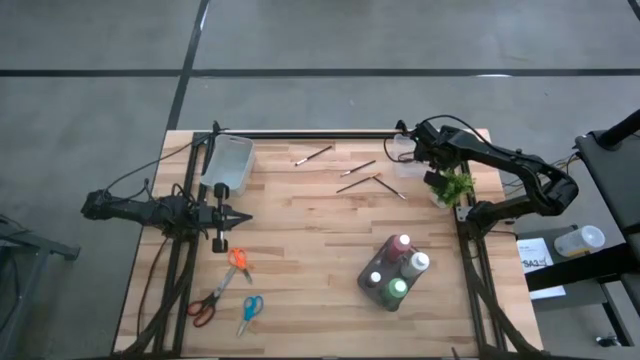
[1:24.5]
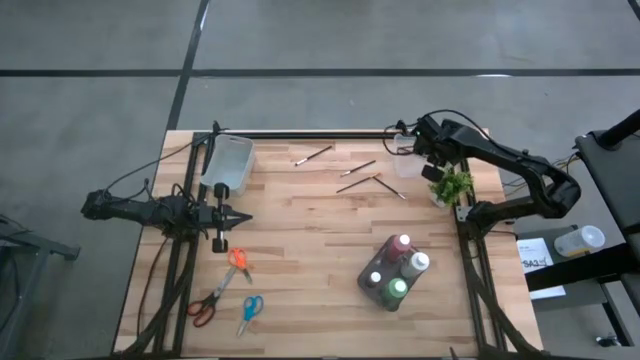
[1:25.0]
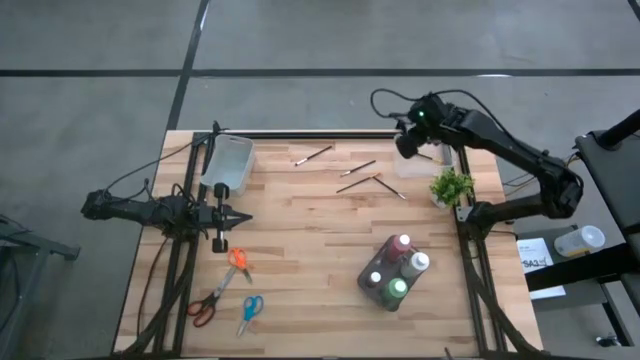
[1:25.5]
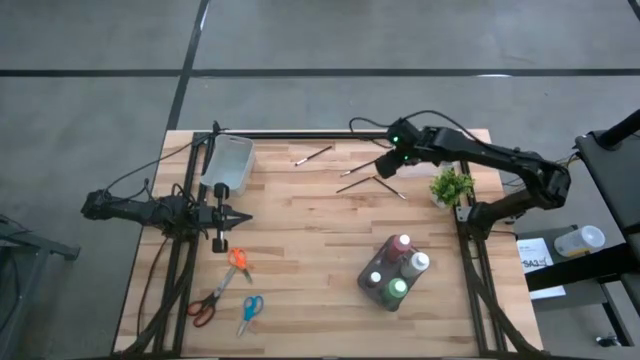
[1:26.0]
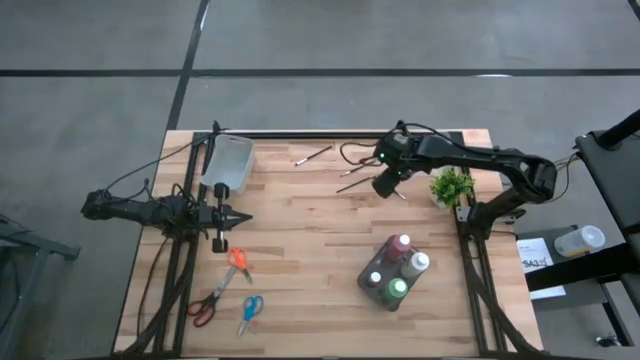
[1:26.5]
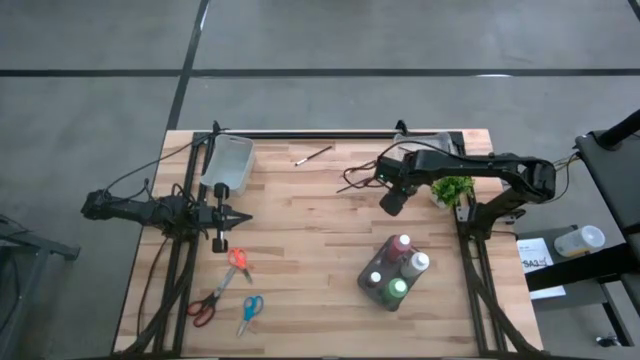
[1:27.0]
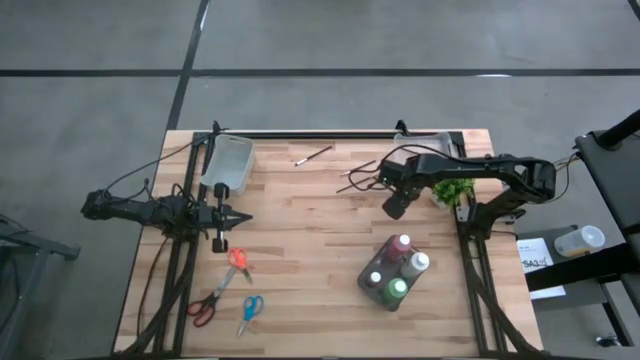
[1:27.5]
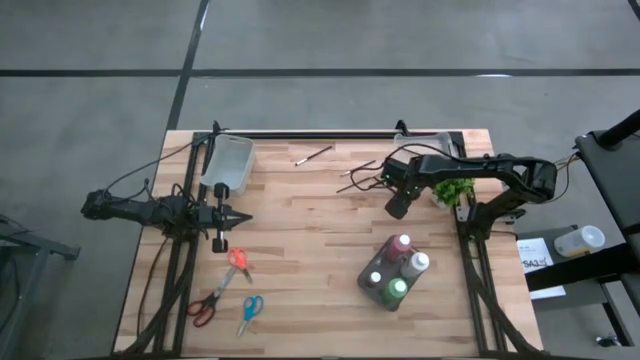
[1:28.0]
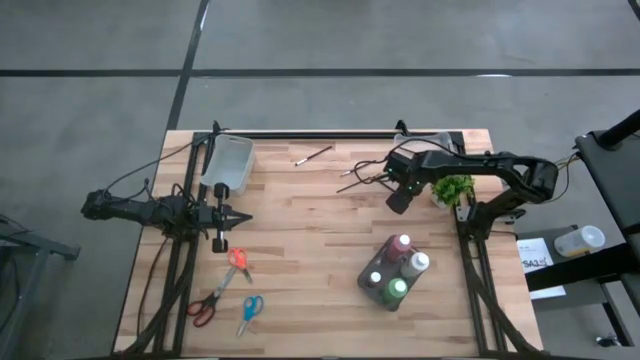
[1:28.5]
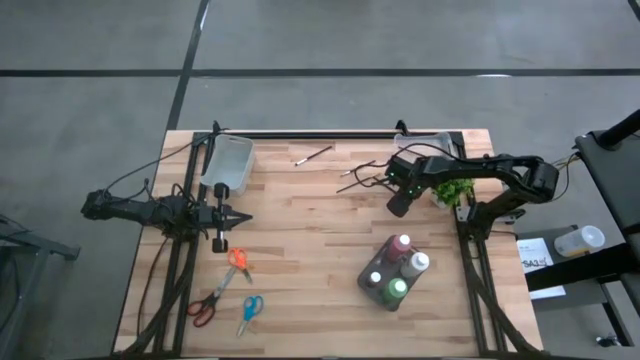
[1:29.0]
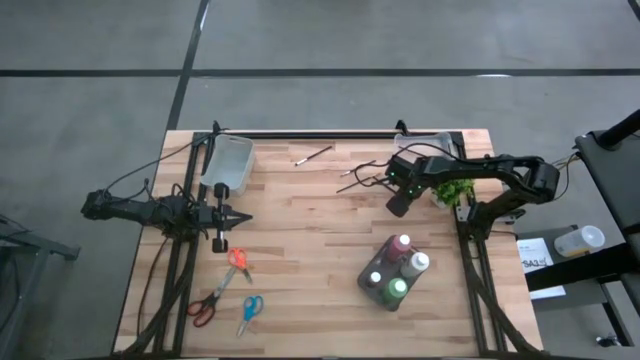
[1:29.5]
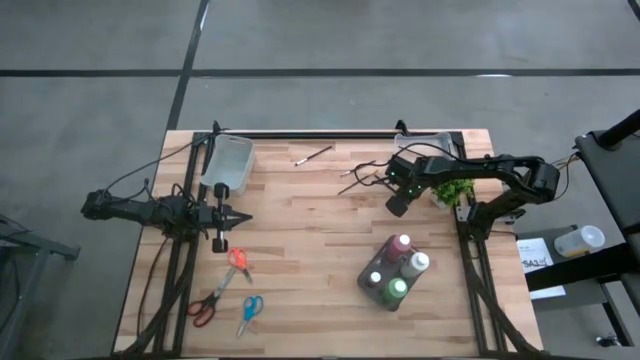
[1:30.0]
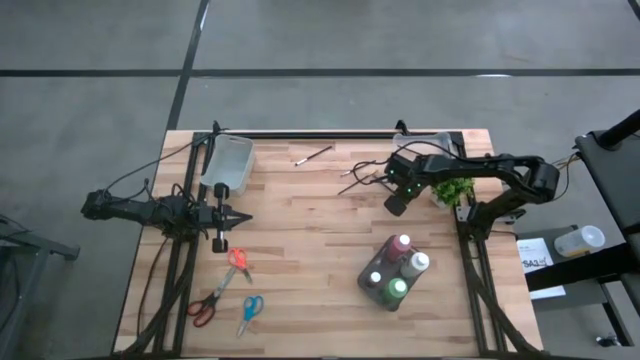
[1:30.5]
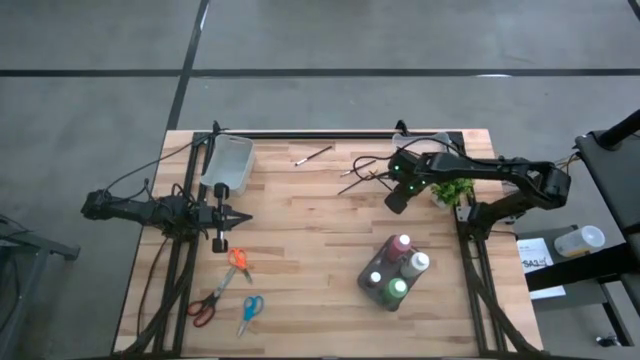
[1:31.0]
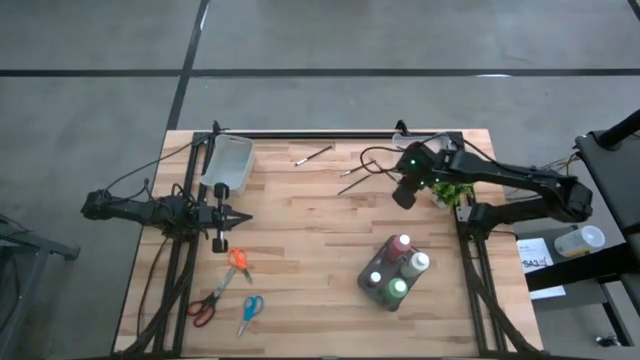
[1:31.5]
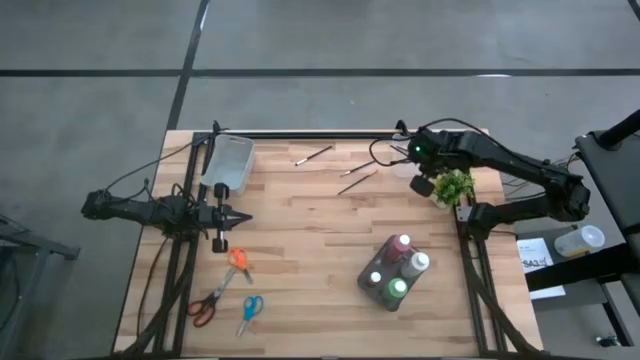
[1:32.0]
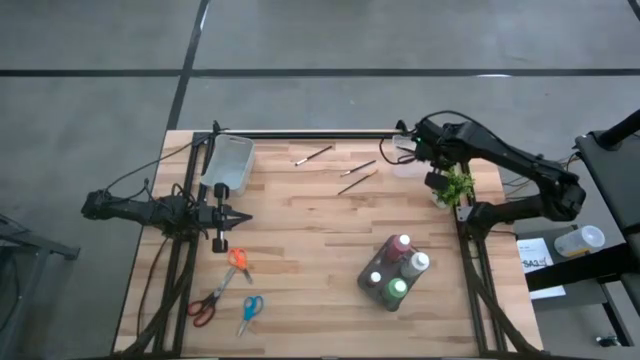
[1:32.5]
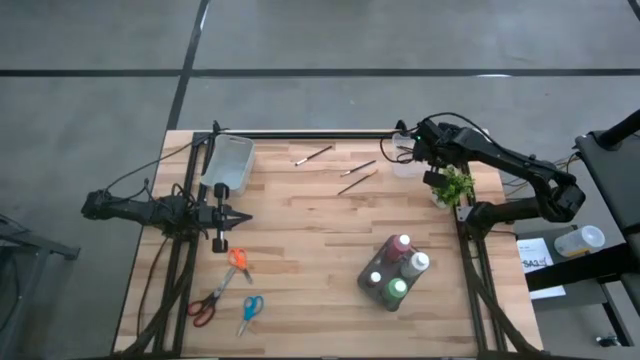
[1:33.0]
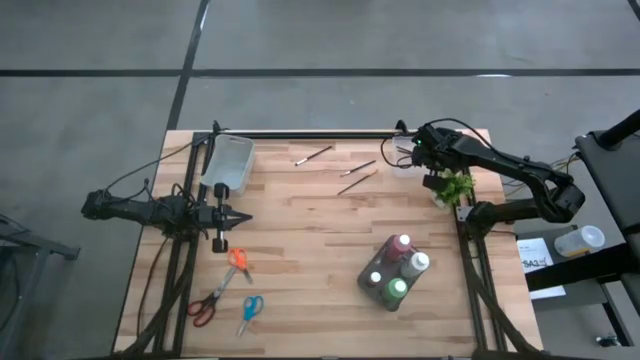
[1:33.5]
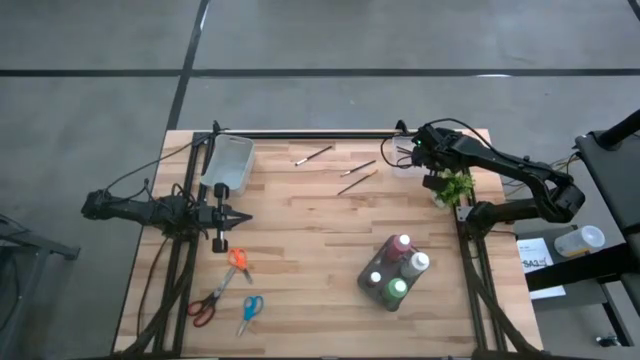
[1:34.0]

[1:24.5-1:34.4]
Task: Pick & Place Paint Supplies
Put the bottom silver paint brush into the transparent bin

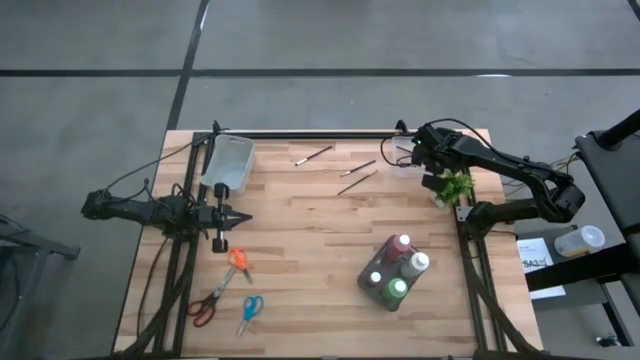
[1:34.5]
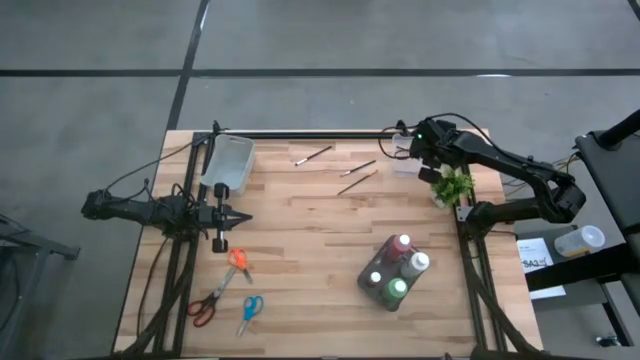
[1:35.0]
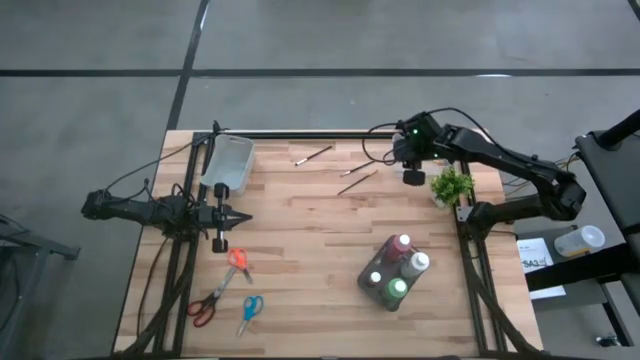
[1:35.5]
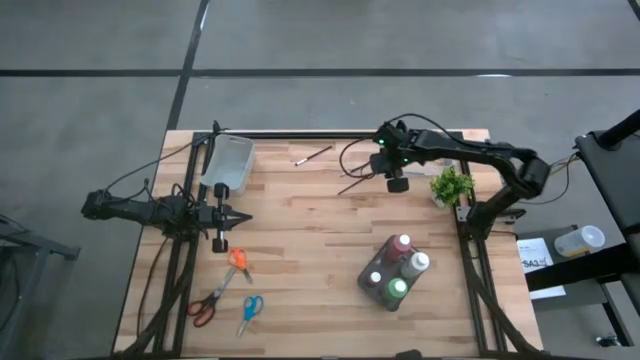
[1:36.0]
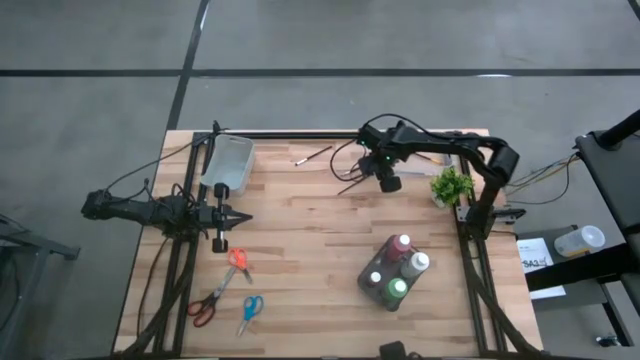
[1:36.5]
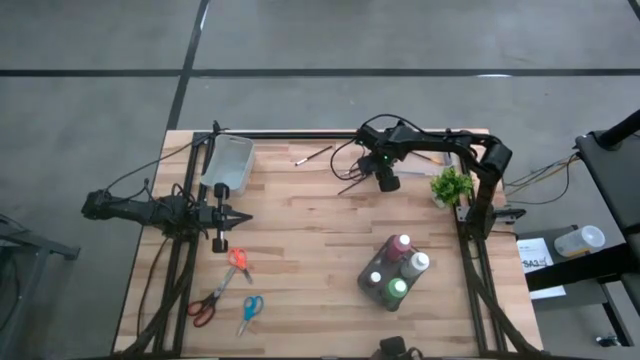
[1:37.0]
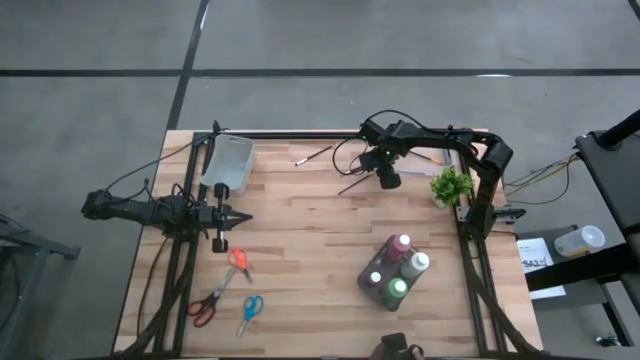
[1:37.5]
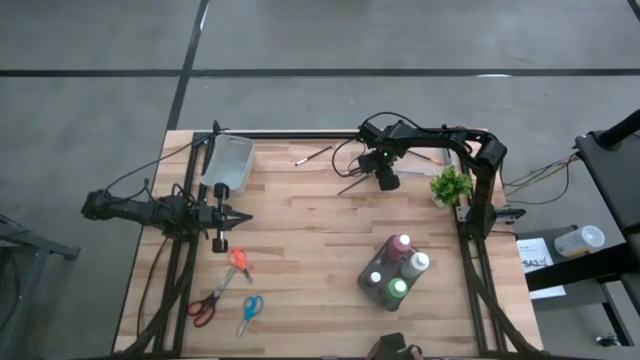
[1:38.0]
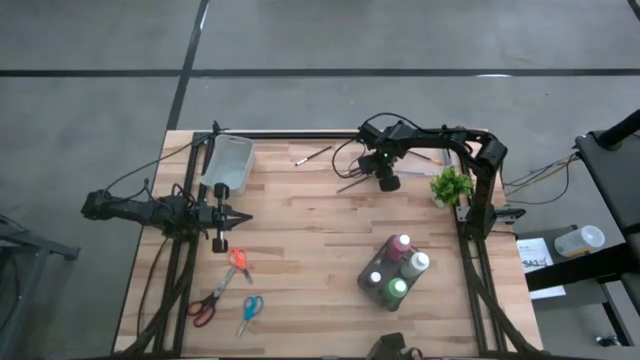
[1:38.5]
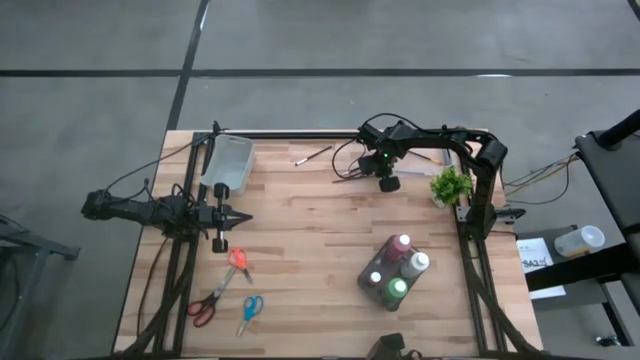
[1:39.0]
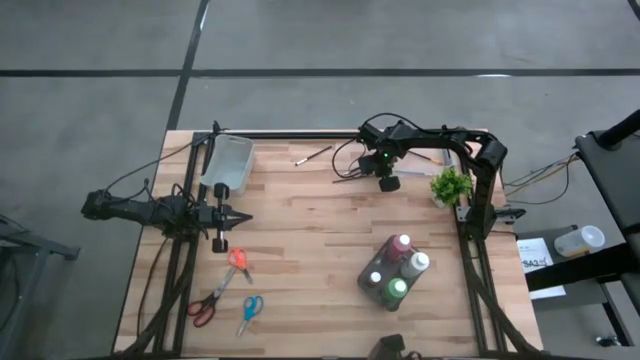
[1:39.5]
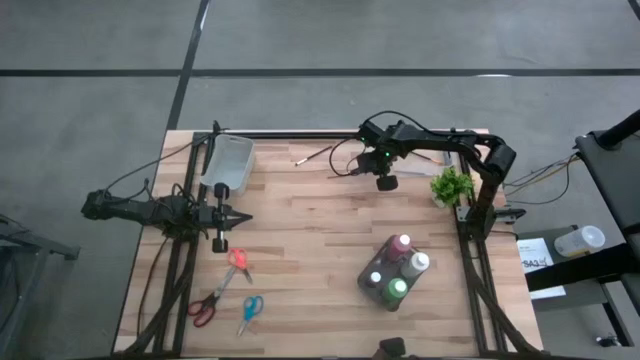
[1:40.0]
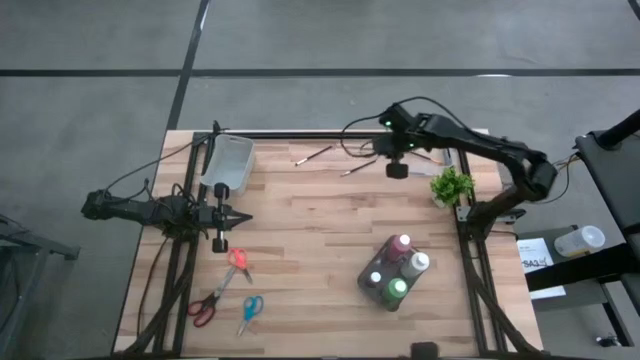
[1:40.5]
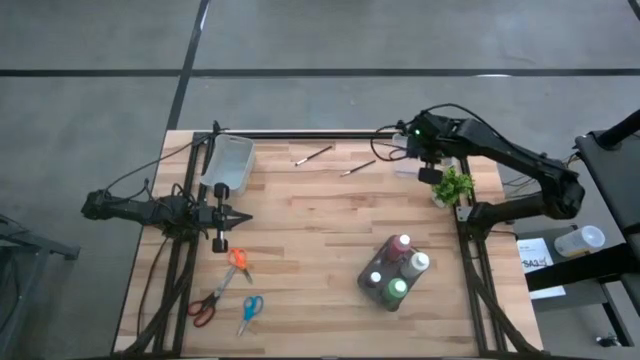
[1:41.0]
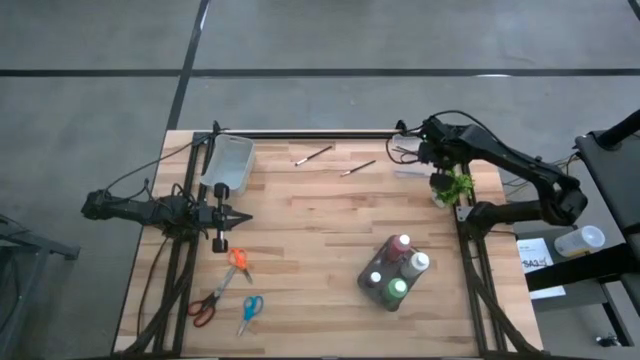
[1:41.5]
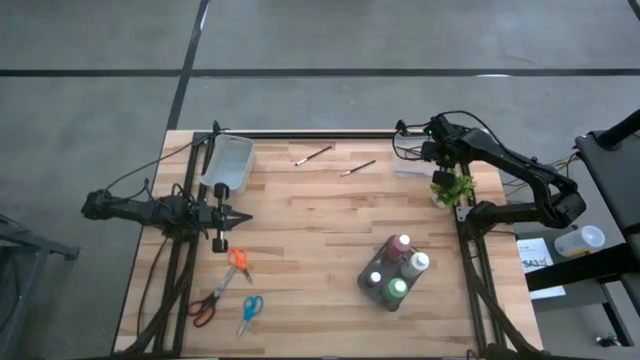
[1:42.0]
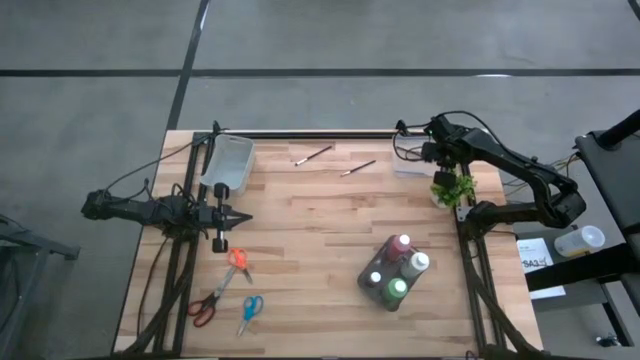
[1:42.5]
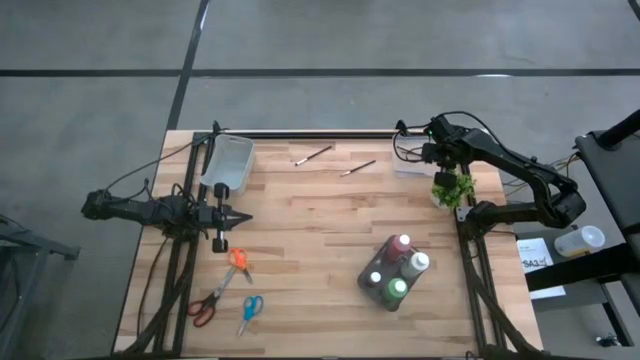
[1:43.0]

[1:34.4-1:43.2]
Put the gold paint brush into the transparent bin

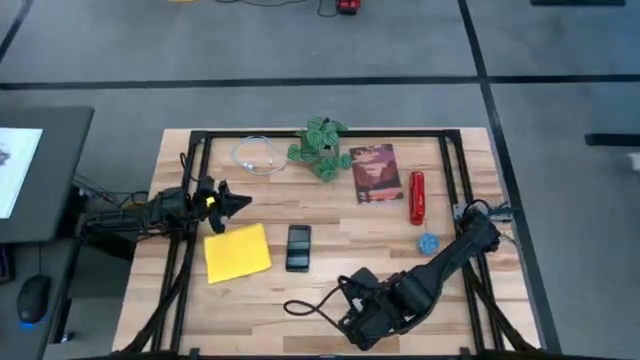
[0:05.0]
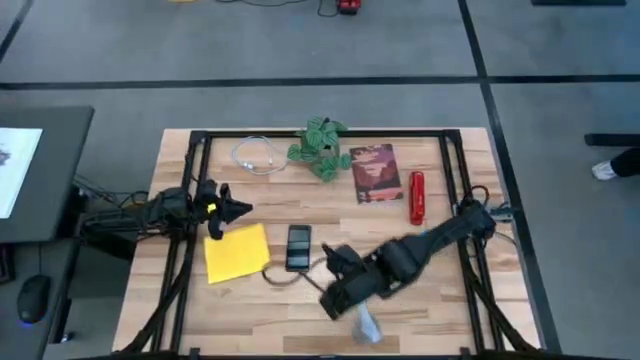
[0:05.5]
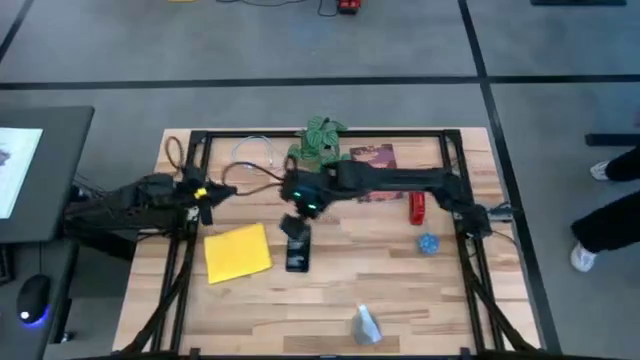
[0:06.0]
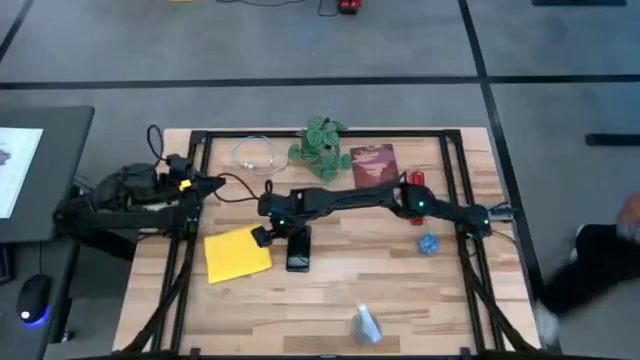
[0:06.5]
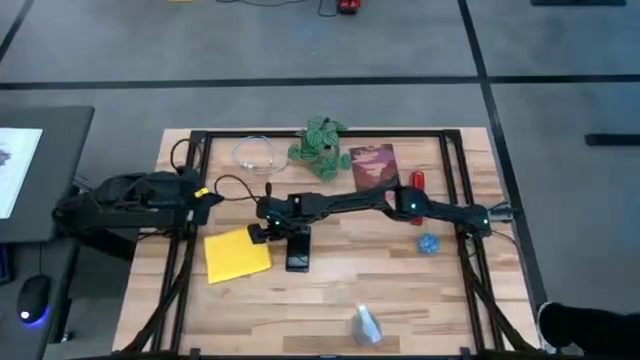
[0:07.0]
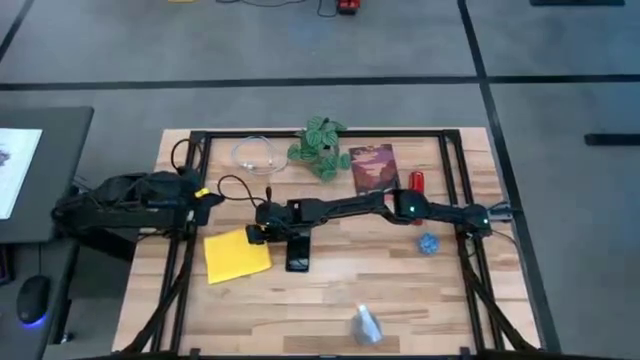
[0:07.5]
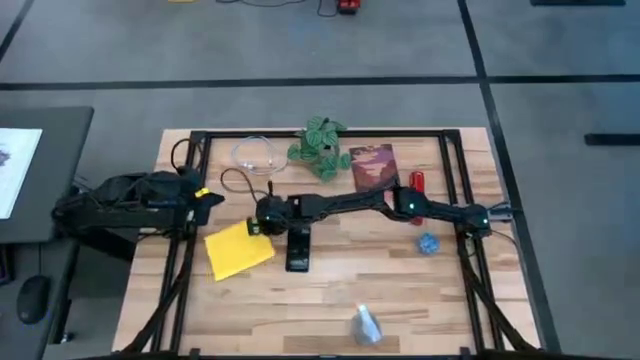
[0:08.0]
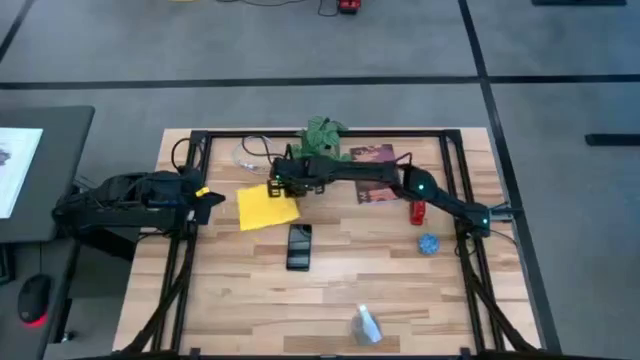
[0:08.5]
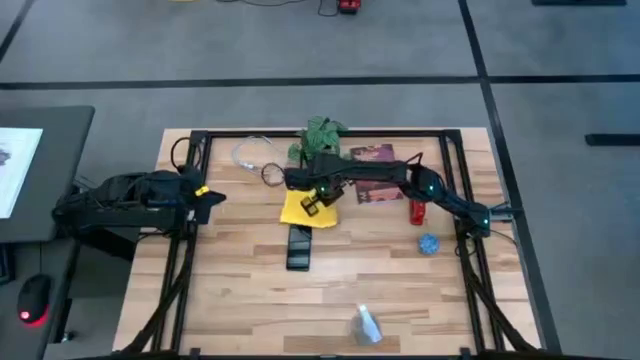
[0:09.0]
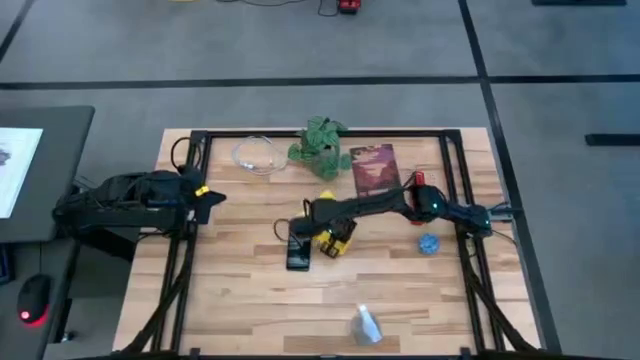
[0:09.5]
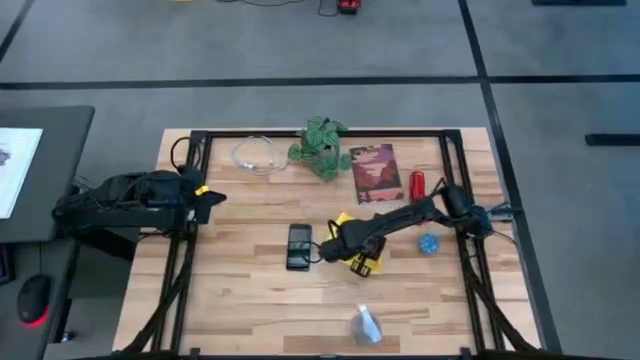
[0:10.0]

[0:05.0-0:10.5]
Task: Apply microfiber cloth
Move the yellow microfiber cloth to the right center
